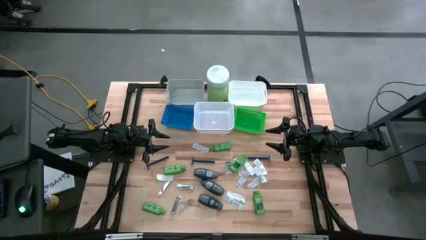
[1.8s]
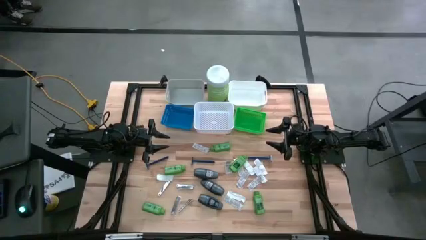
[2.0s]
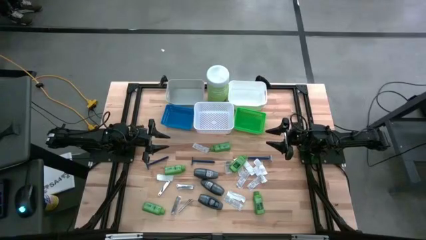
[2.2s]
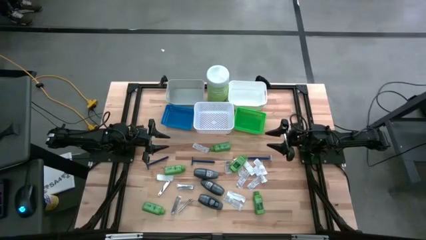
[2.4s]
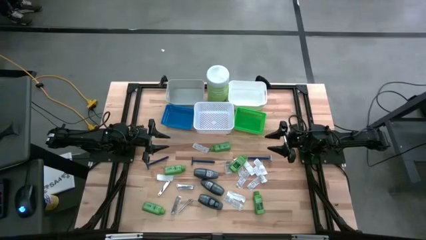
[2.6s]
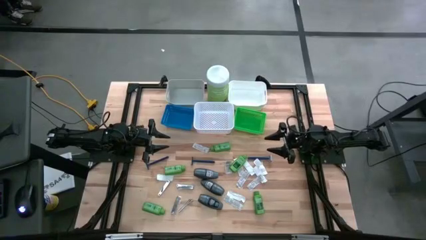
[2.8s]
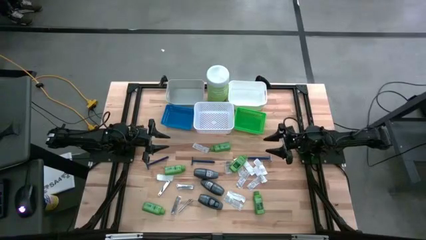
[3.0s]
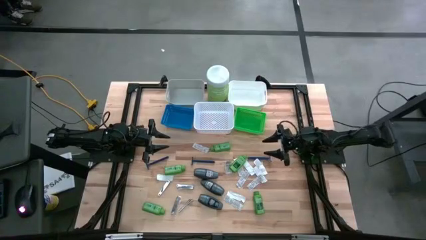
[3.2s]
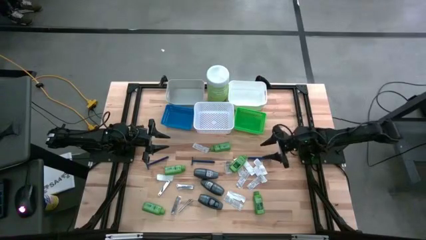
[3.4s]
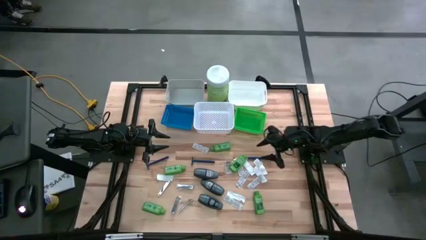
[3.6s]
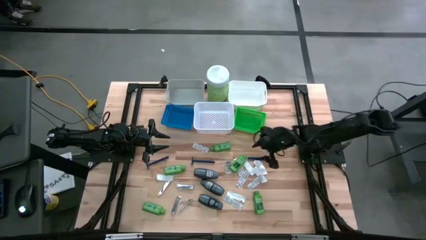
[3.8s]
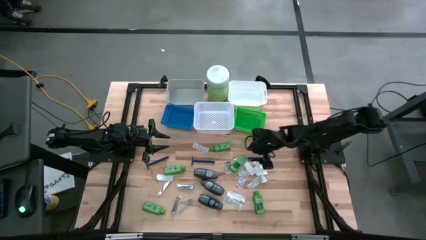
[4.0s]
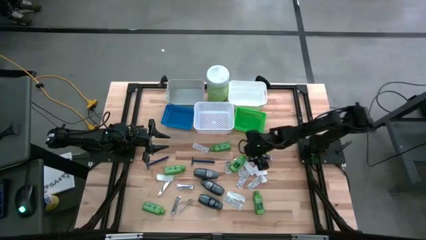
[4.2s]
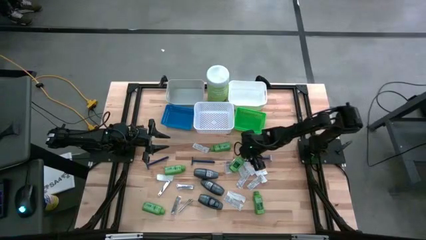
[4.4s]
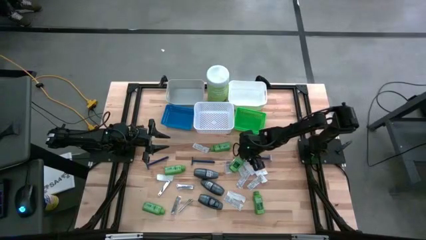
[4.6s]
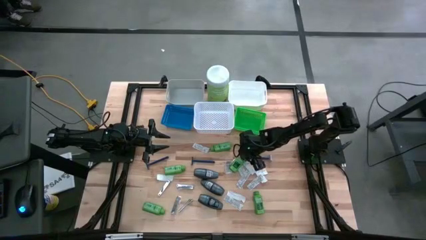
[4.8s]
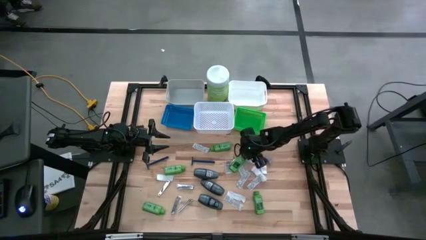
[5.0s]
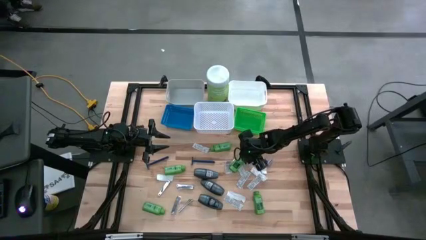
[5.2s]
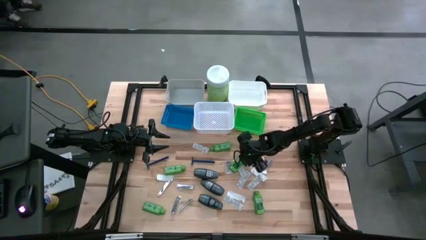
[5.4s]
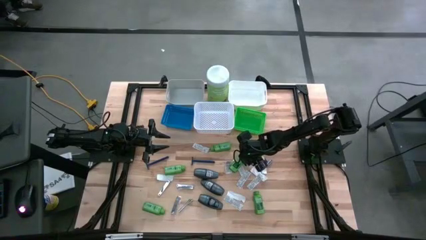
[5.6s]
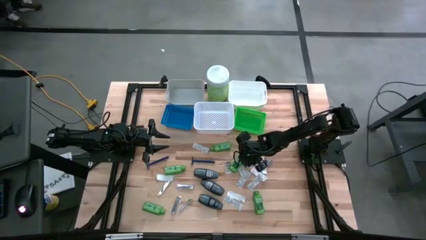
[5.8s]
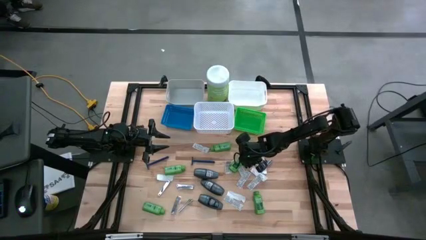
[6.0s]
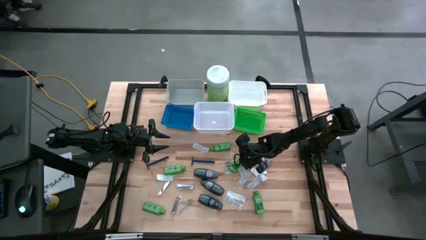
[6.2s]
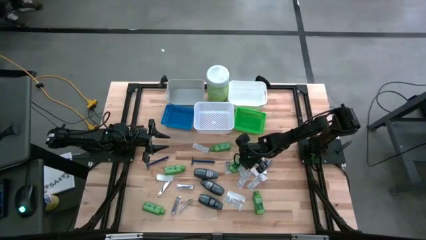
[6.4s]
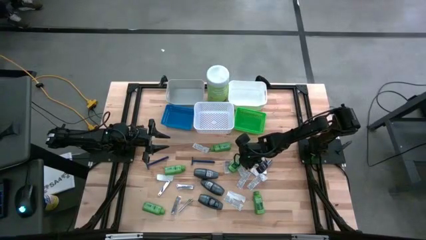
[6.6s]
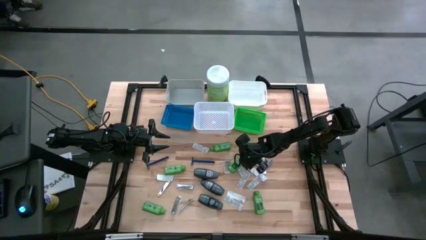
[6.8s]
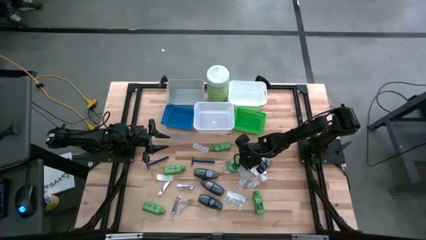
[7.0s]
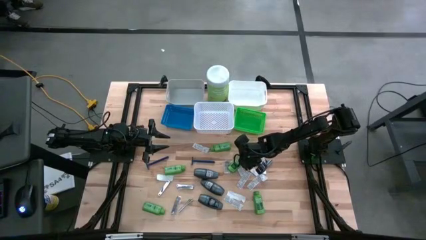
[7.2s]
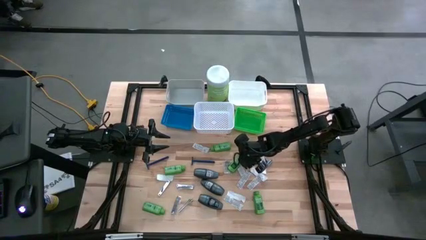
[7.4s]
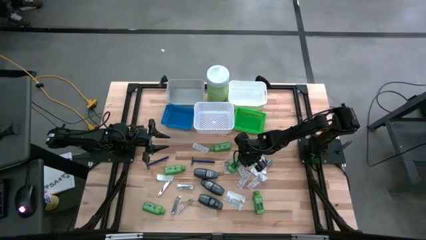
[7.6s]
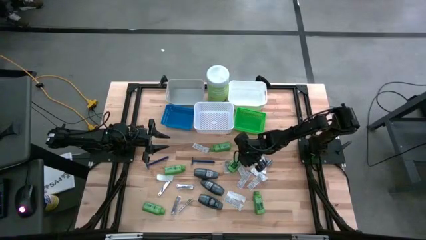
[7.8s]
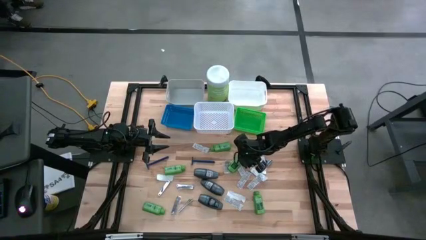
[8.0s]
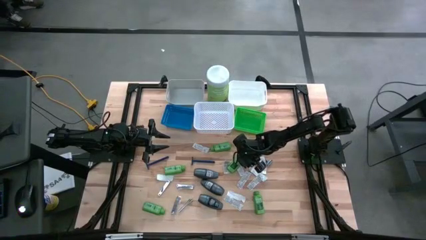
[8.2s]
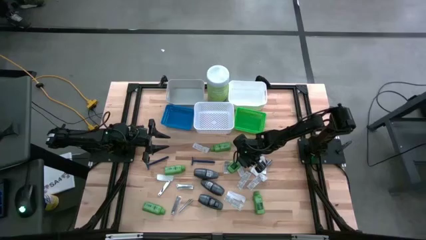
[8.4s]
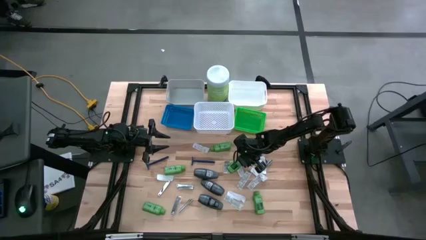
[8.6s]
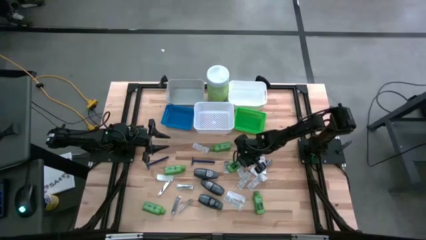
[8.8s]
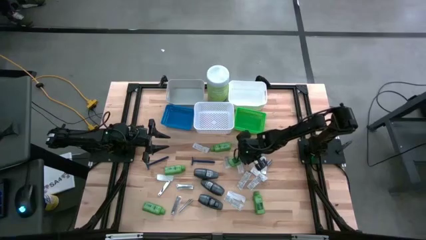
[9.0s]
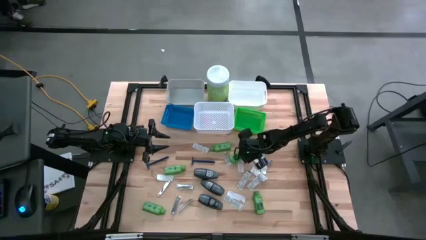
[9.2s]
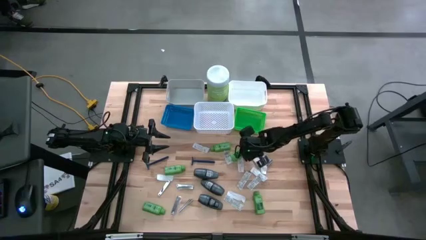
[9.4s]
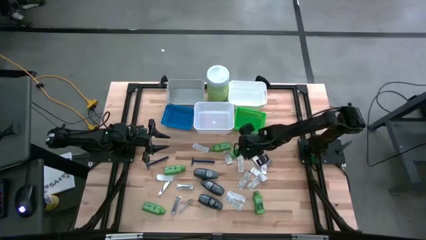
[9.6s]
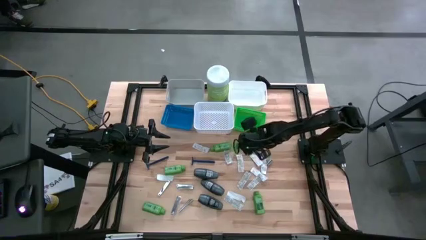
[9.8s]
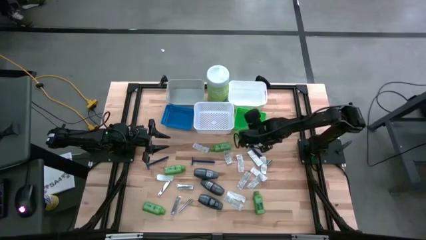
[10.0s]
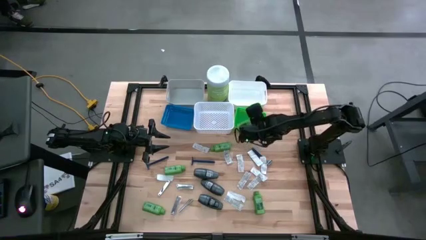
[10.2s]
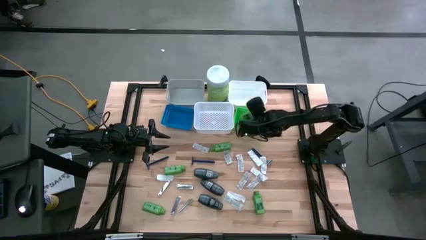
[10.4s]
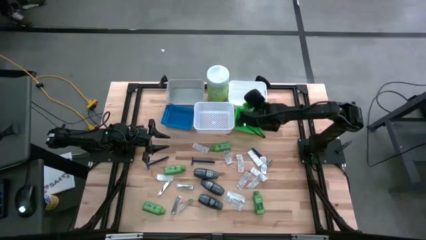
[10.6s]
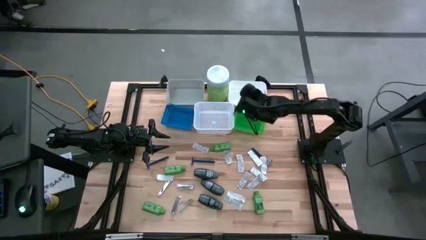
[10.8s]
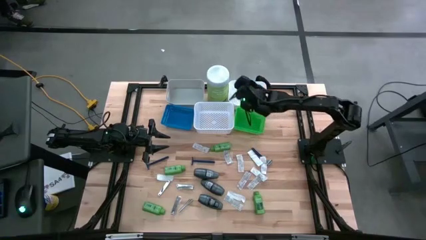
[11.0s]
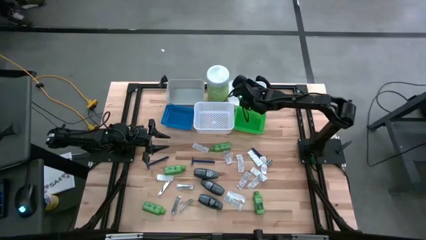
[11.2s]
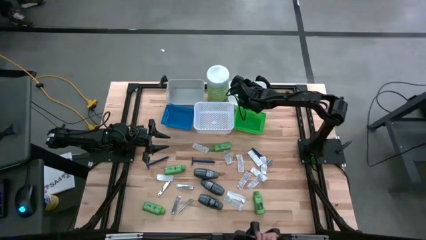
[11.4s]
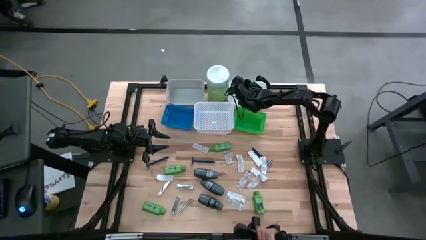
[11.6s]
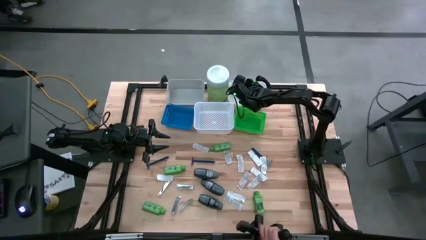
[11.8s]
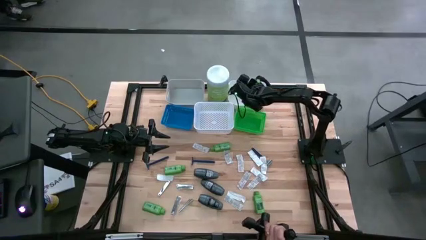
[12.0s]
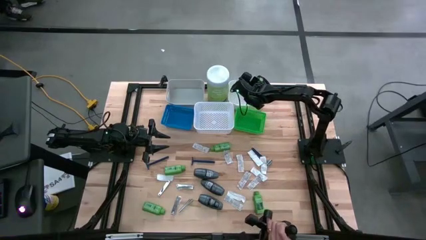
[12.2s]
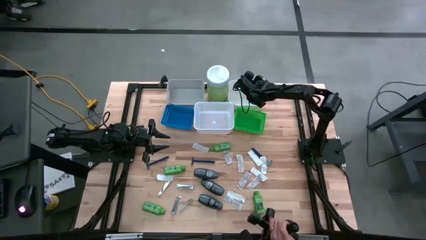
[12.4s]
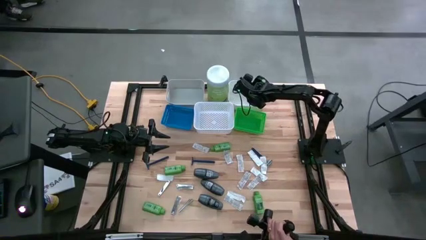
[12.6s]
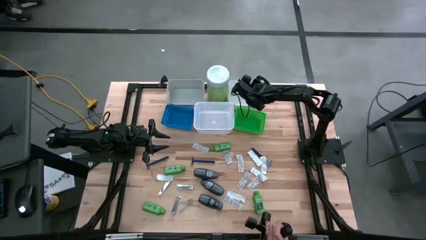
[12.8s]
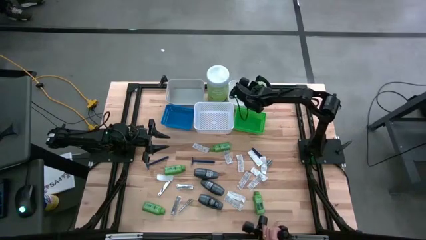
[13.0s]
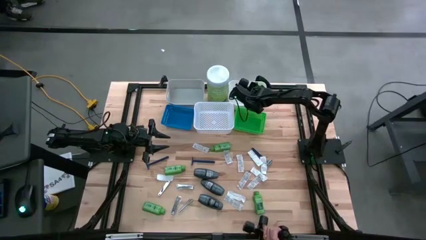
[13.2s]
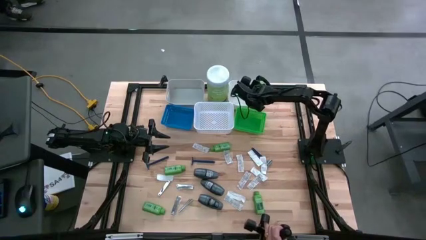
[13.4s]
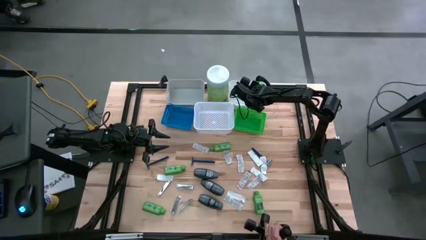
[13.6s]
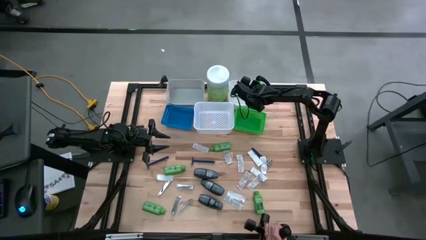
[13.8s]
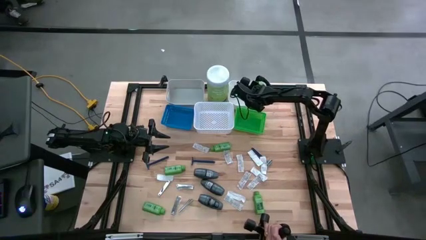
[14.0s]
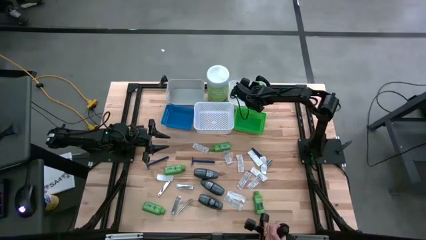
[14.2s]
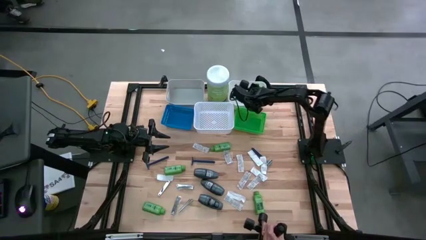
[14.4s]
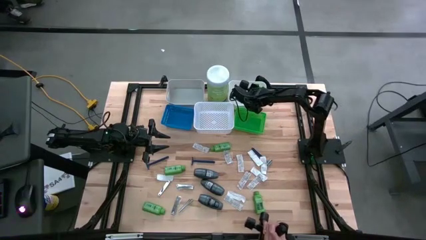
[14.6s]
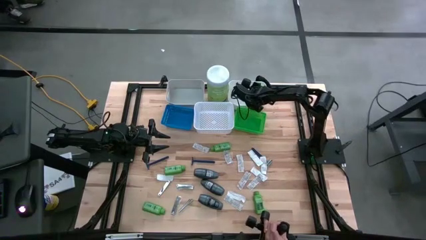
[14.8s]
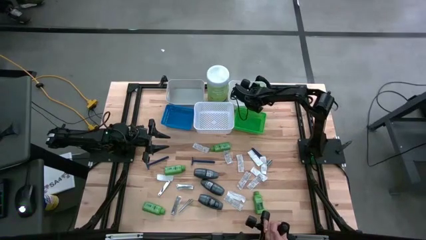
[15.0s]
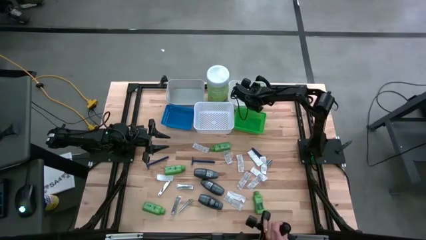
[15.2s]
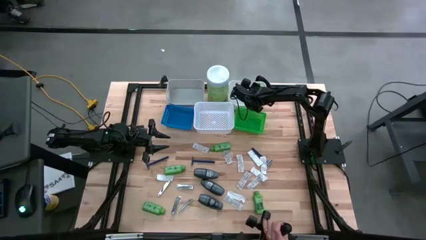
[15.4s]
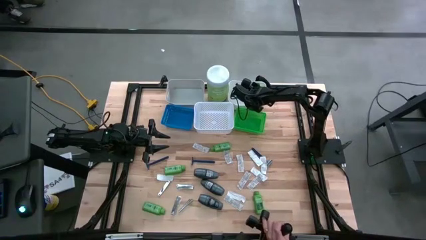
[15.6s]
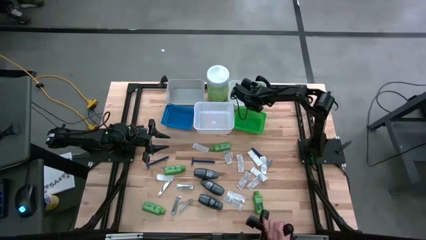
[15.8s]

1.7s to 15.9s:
Task: Pick & Place Travel size toiletries
Put the green shampoo into the small white bin
